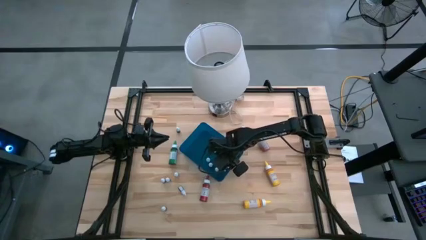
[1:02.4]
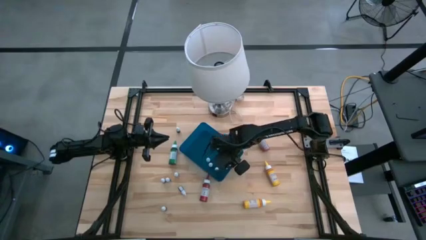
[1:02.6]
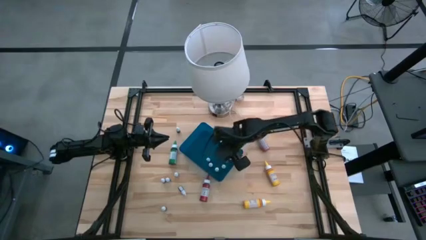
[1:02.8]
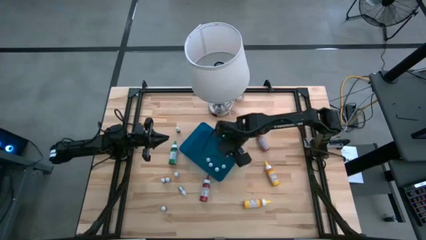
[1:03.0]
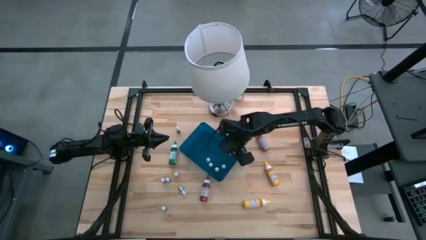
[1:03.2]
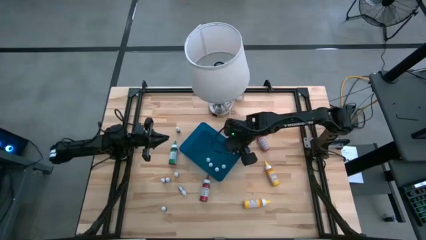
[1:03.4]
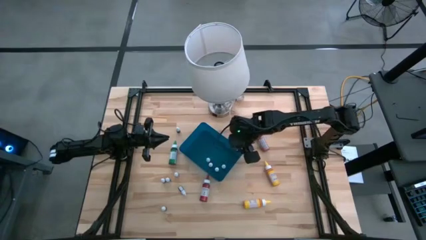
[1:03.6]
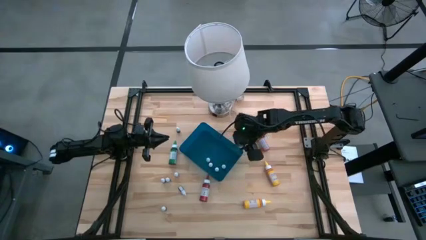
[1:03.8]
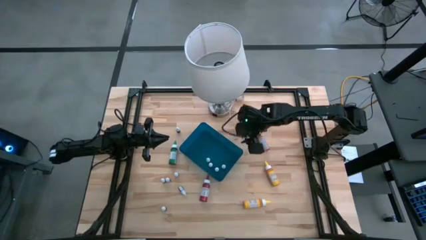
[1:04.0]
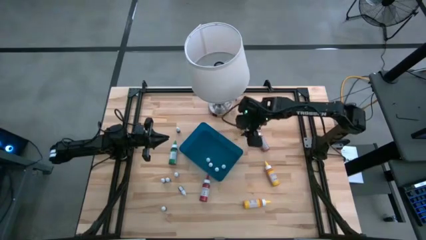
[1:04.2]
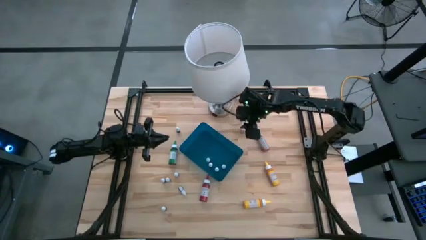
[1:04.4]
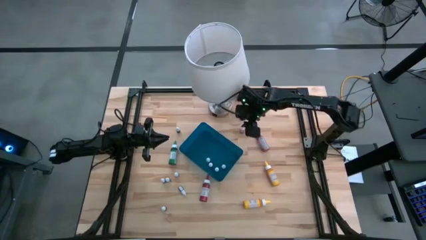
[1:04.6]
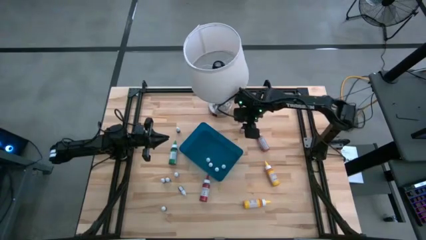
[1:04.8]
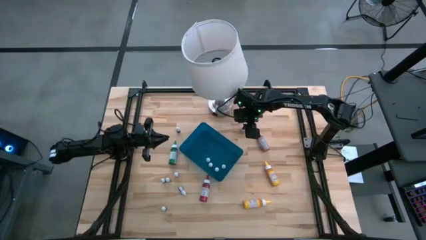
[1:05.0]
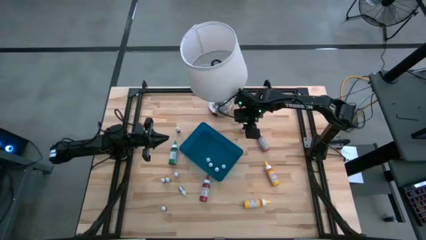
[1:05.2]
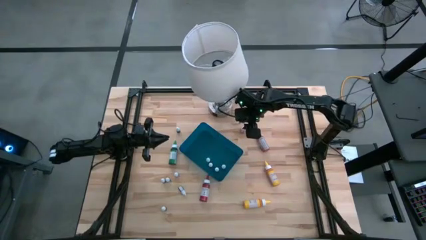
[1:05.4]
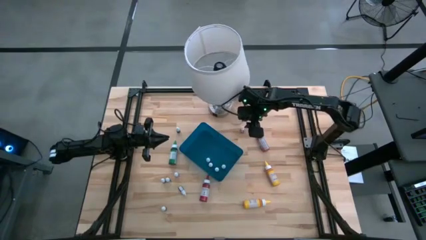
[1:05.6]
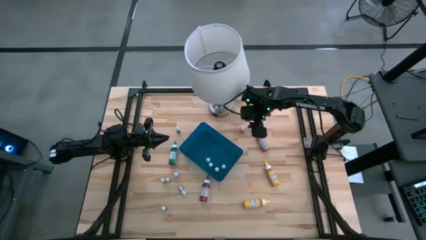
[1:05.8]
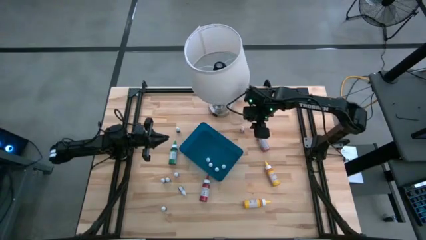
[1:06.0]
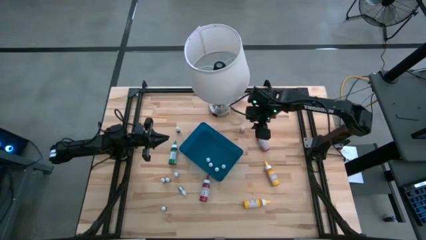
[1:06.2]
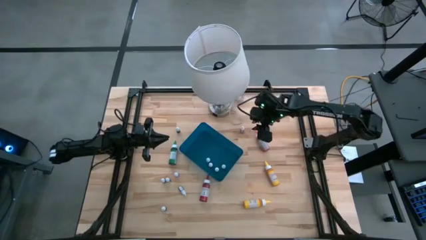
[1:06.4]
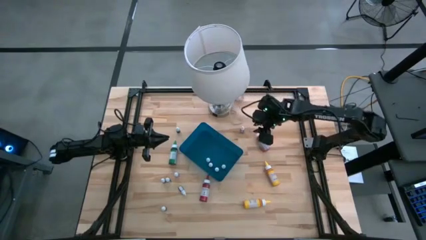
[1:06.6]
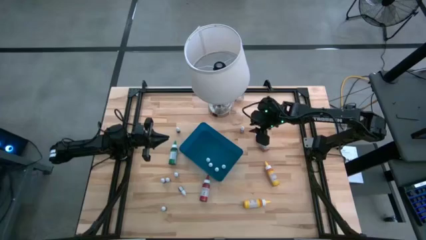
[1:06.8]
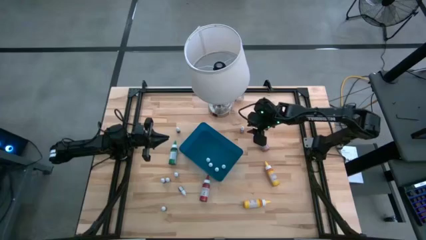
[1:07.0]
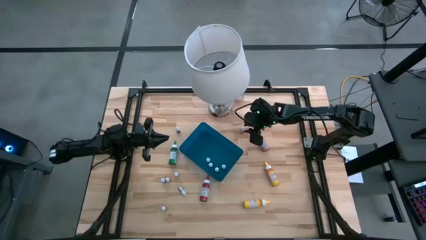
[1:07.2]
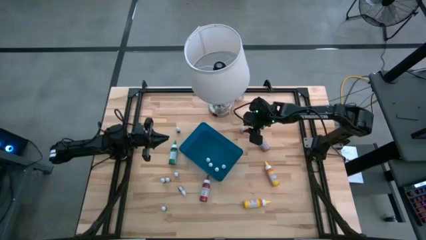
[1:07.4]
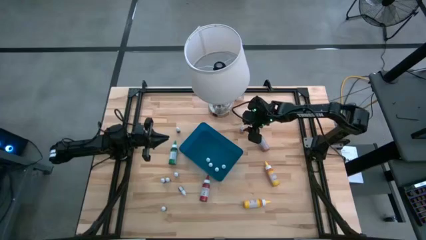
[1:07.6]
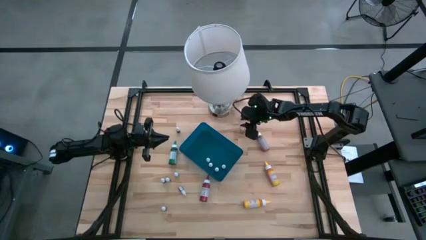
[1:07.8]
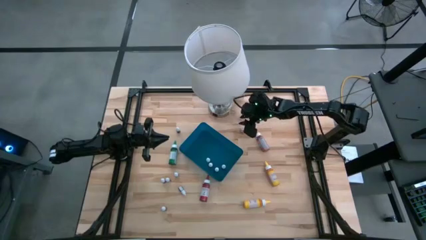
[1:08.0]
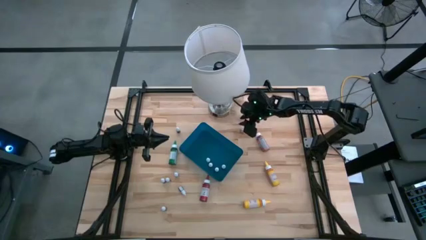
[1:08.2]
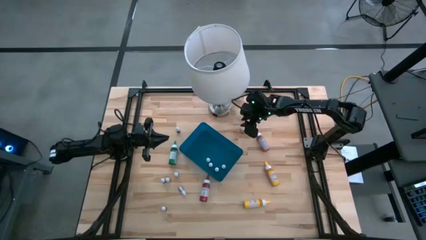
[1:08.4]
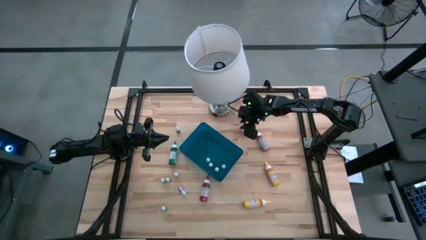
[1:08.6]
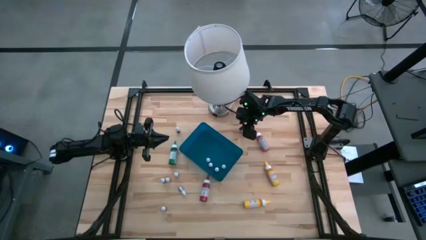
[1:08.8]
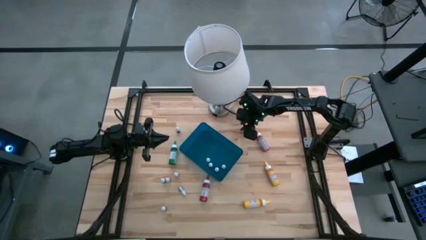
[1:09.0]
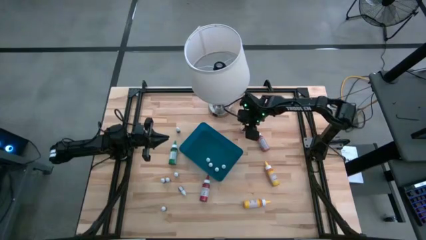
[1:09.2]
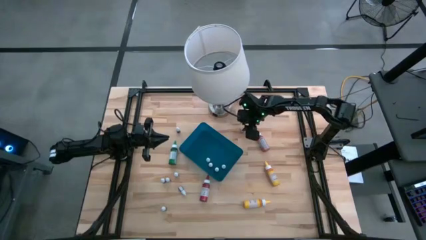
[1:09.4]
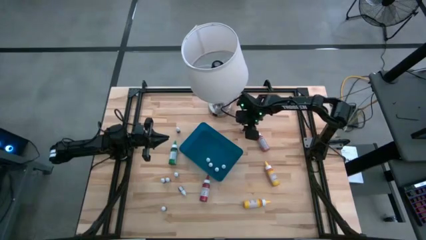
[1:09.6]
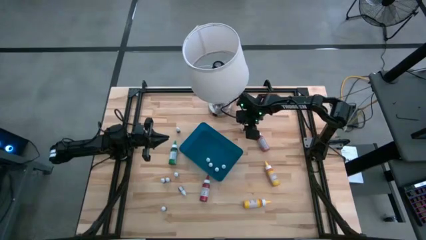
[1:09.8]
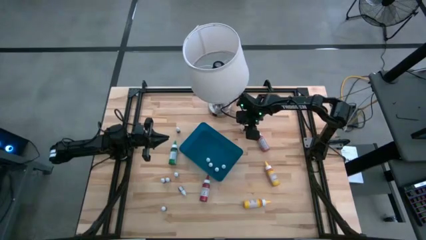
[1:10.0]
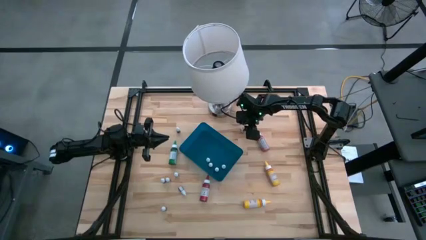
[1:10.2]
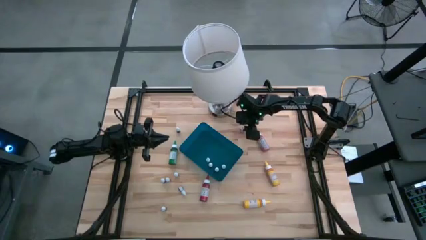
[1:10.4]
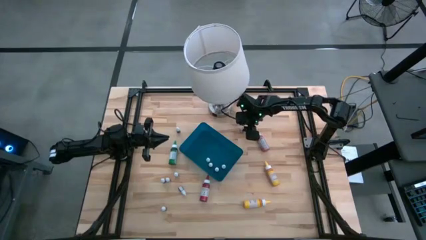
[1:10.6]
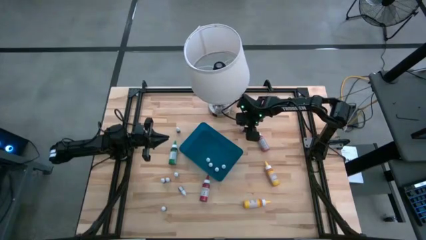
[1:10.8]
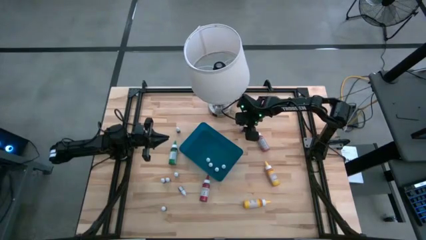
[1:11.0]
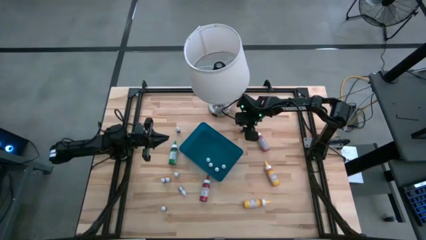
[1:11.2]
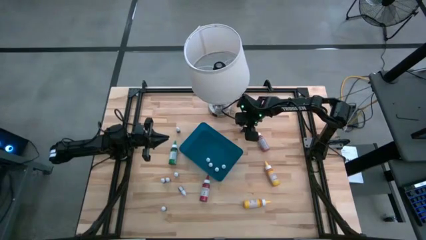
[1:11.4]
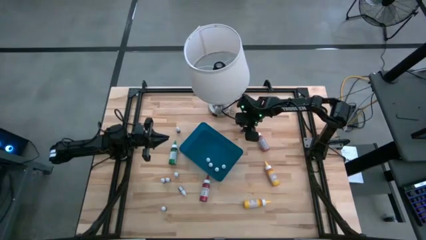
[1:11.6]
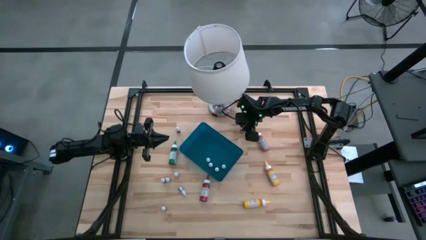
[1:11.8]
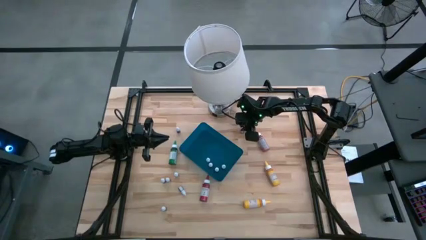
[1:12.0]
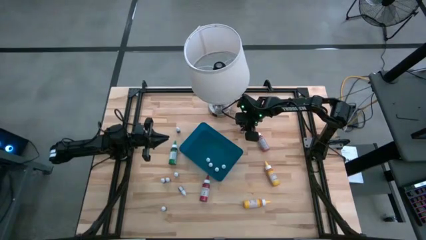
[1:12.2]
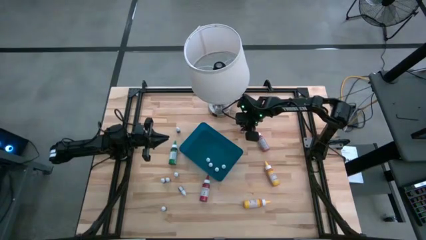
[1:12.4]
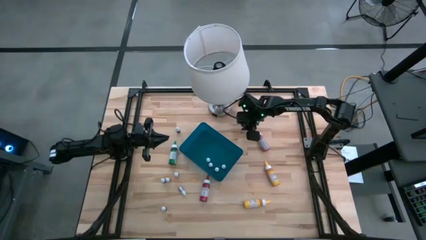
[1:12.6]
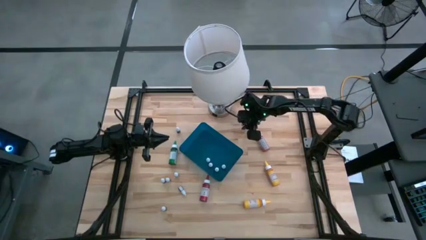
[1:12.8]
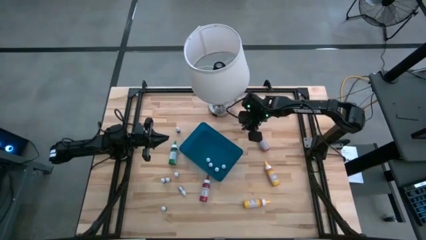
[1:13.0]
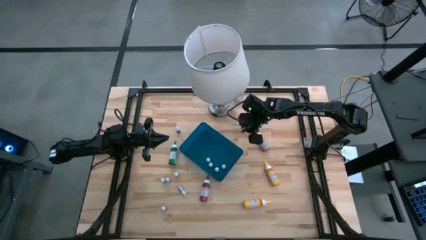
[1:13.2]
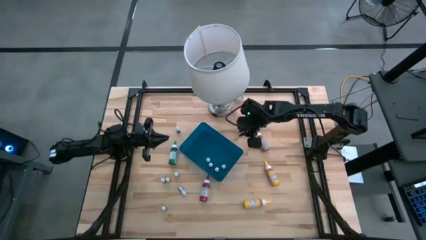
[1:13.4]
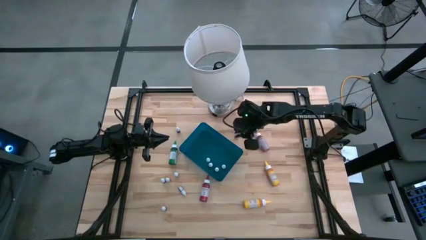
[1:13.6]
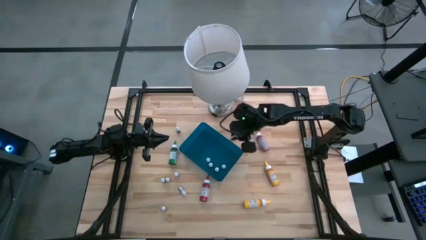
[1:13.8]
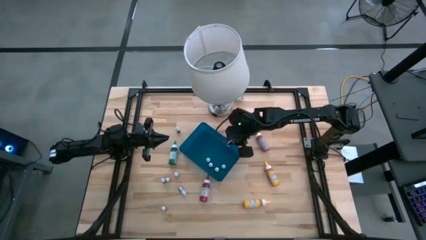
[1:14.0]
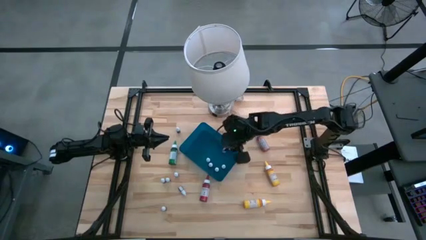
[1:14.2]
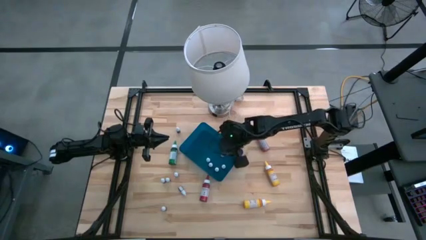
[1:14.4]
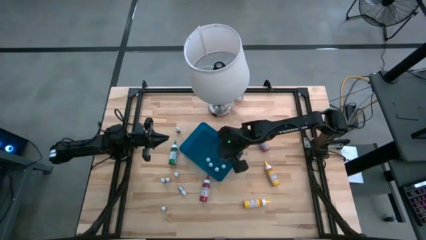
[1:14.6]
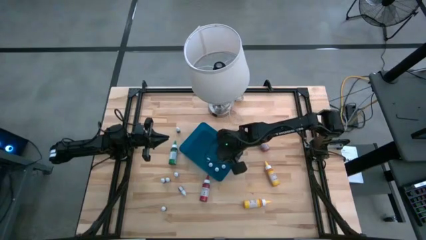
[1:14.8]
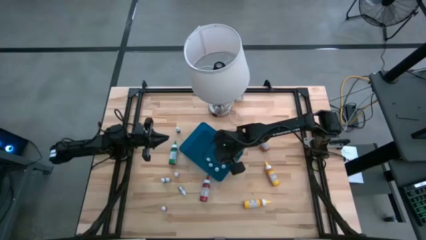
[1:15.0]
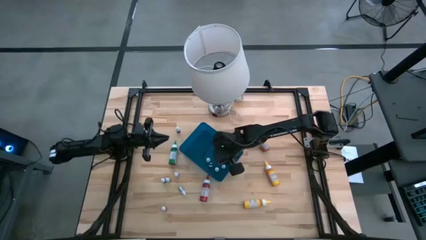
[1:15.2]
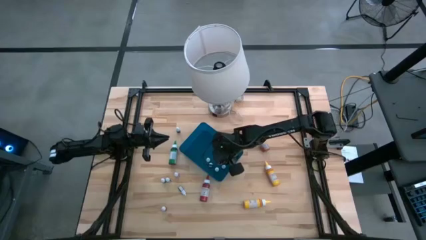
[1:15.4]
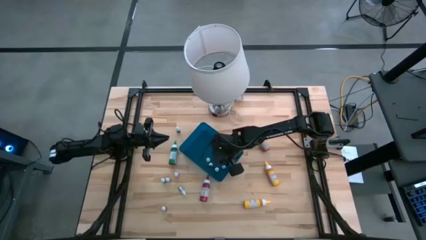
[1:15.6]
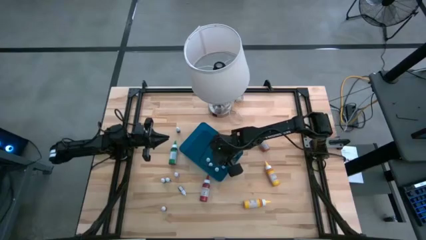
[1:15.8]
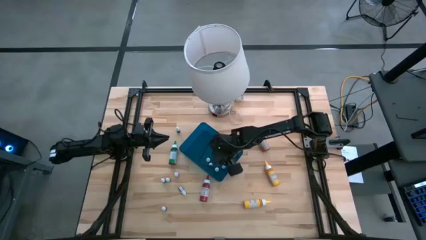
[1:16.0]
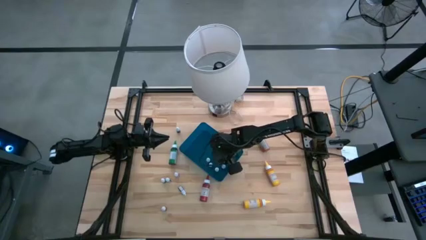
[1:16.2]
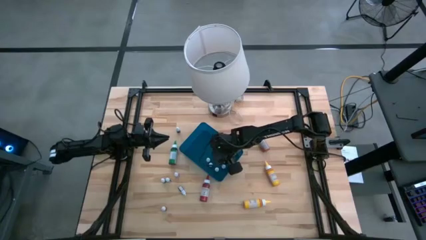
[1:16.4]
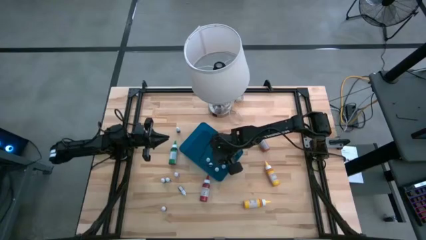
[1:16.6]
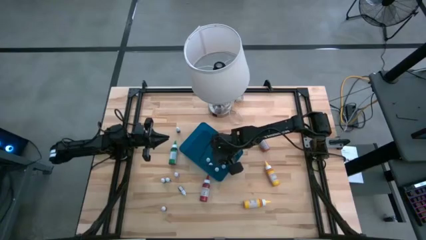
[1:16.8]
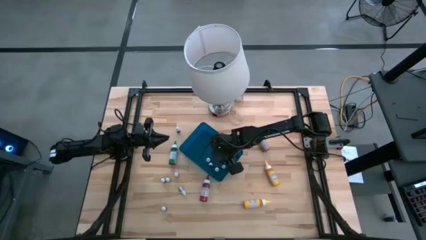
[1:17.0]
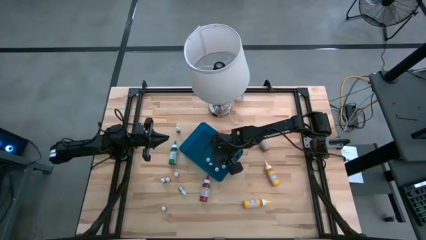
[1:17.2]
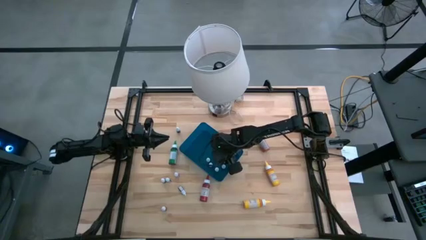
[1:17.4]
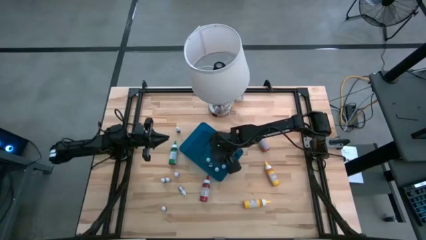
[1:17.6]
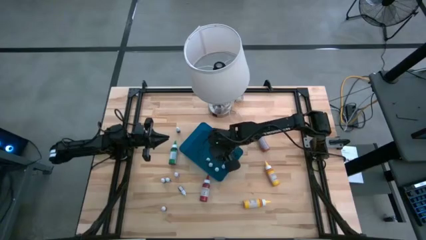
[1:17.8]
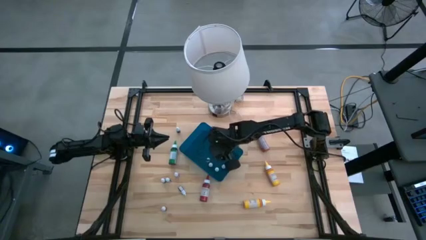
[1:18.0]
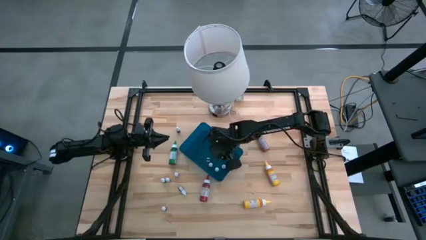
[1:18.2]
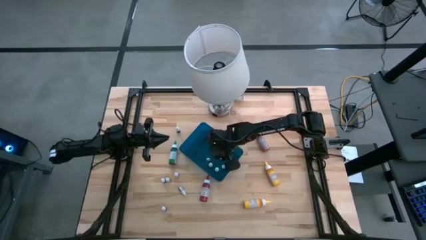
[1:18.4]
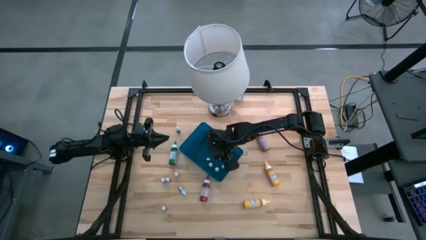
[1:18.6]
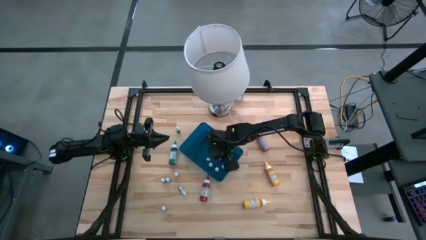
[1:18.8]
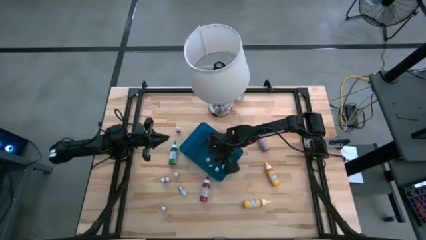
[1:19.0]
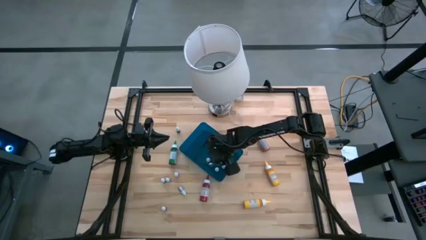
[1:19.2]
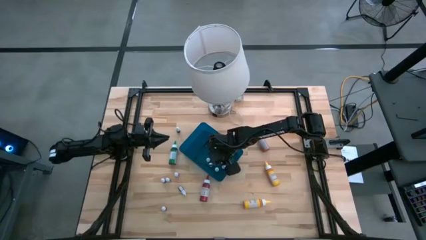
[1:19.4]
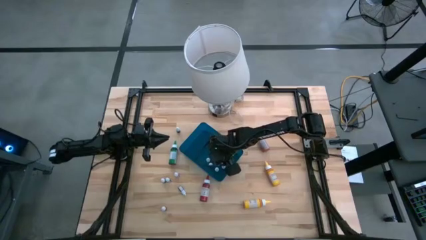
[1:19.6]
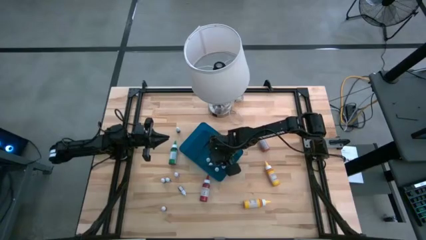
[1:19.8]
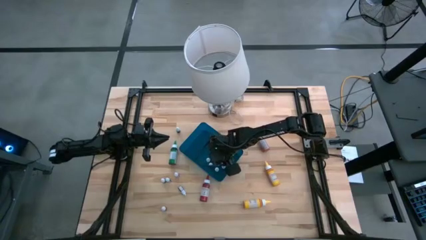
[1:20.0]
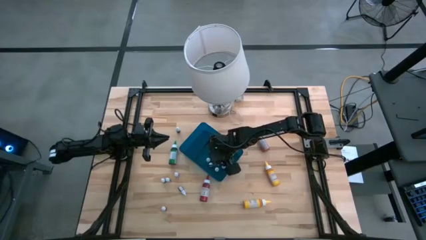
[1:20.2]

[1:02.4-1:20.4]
Task: Pick & Place food coloring
Put the small orange food coloring bottle into the blue container
